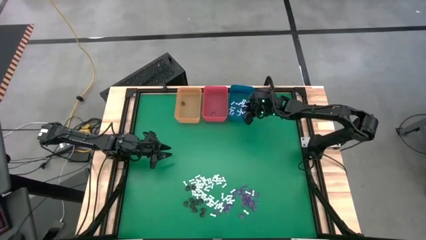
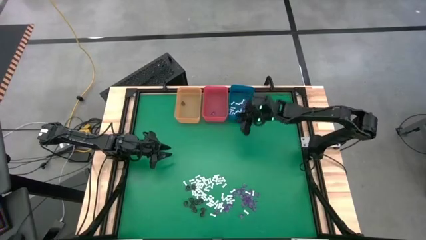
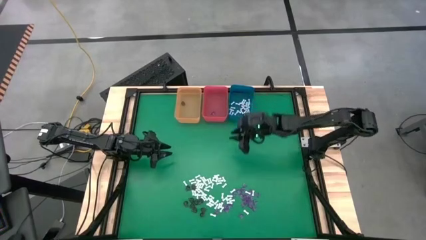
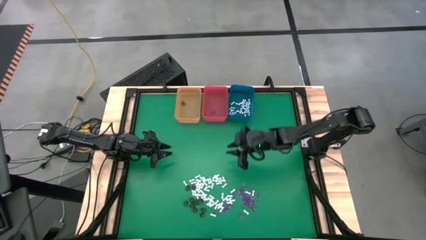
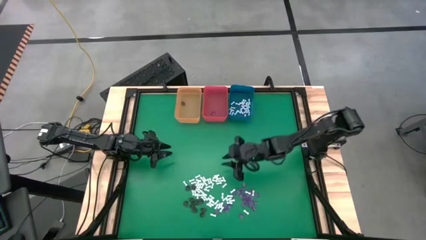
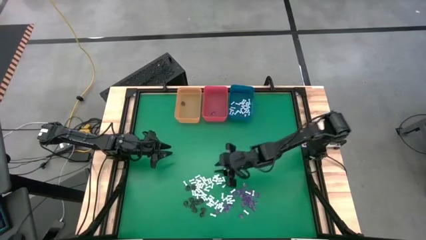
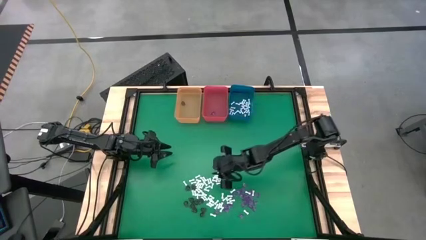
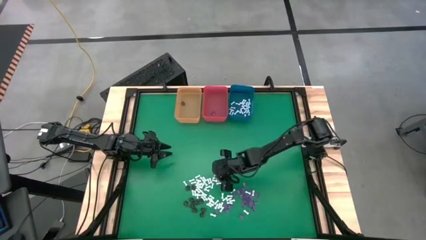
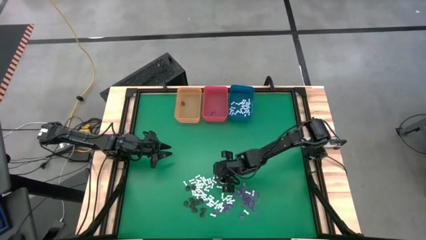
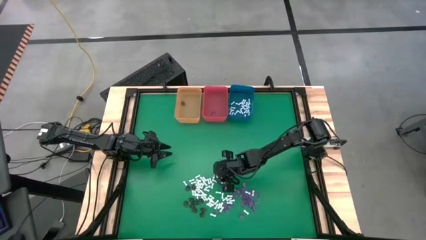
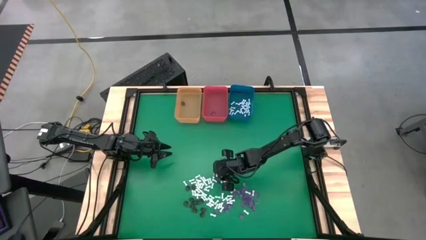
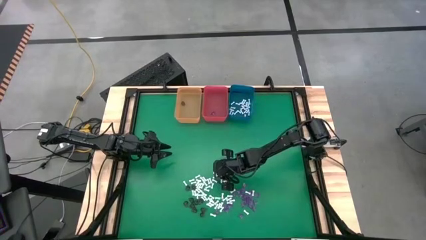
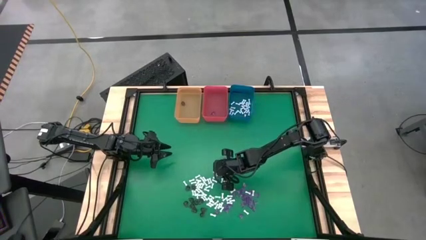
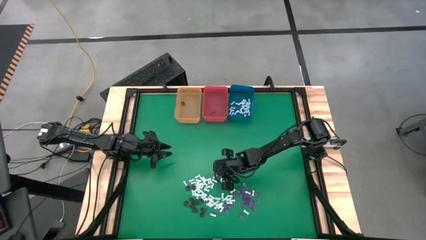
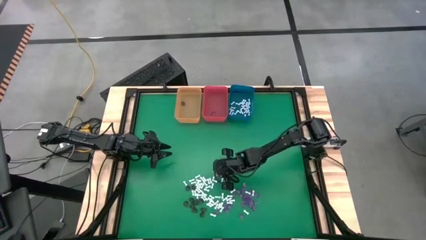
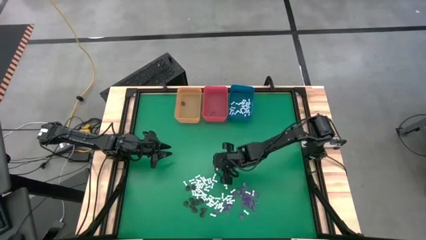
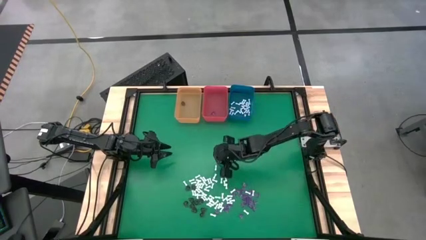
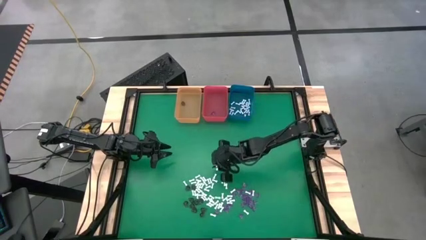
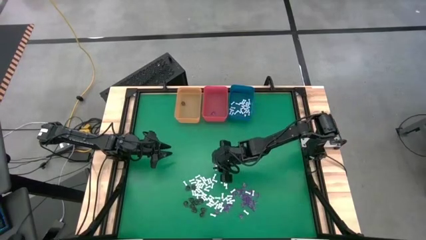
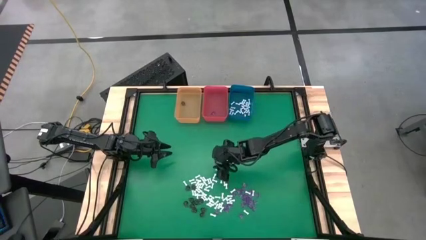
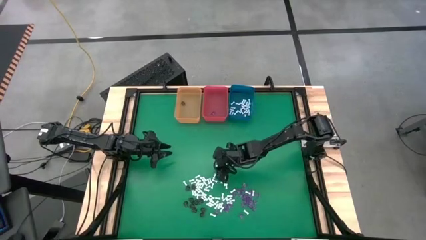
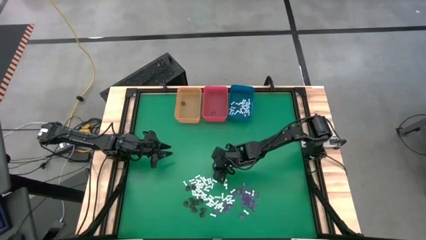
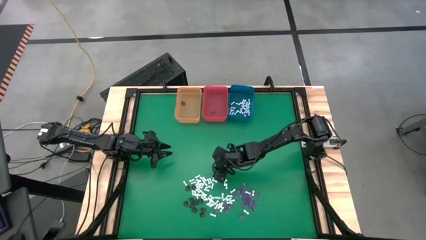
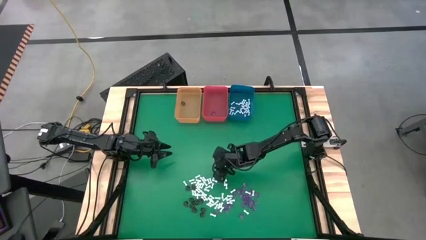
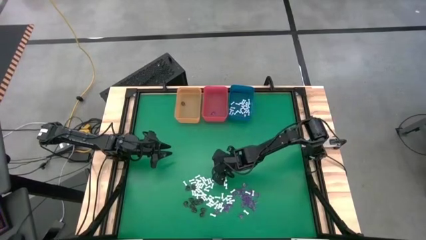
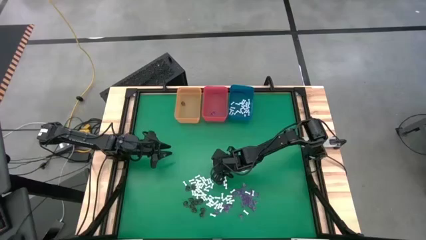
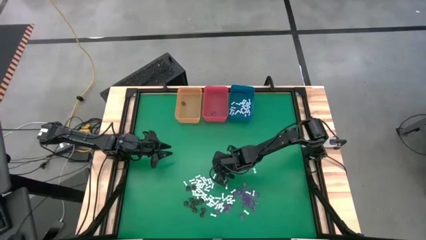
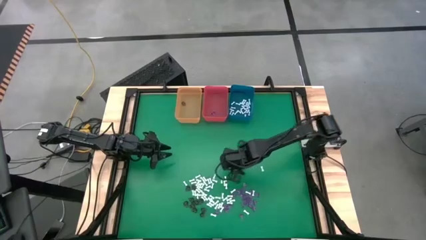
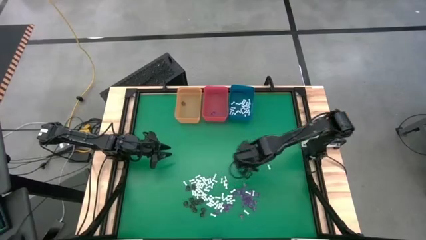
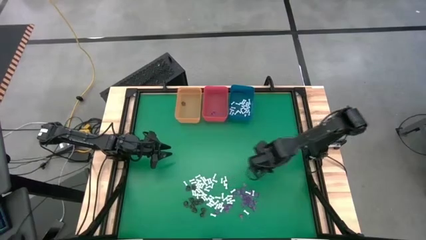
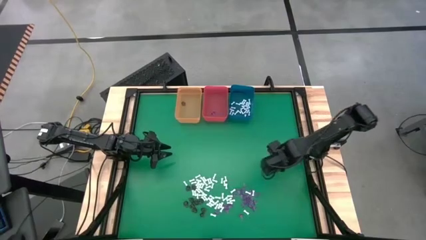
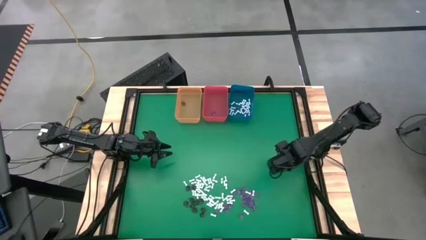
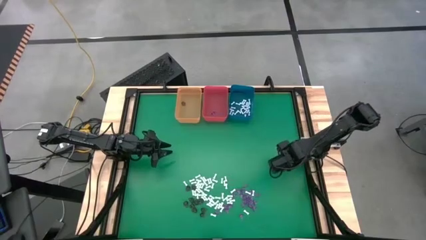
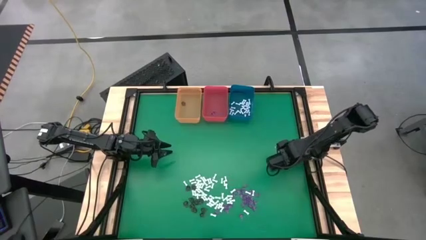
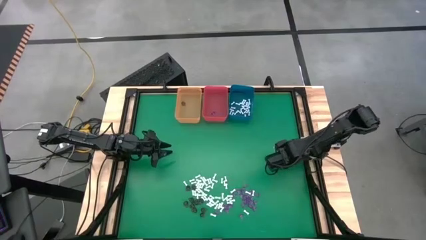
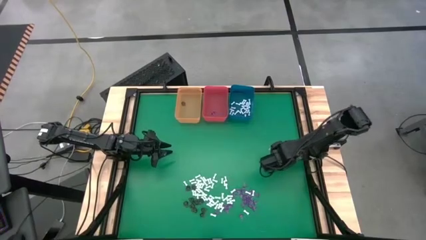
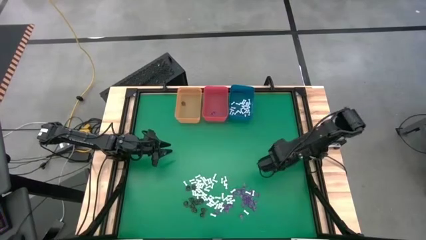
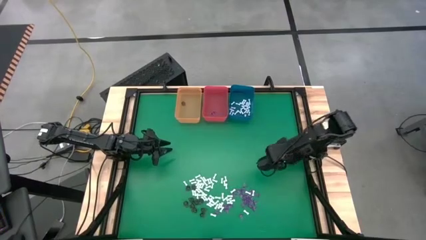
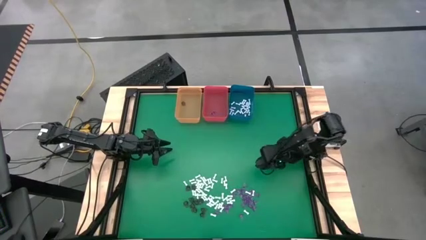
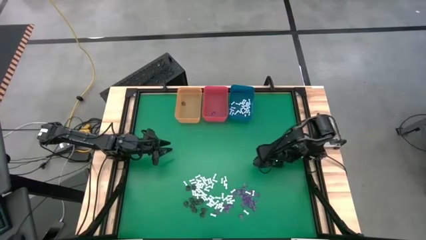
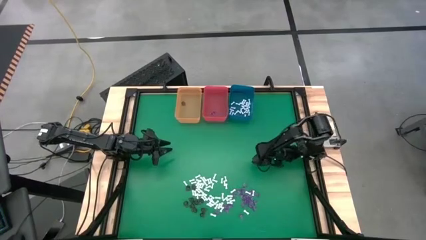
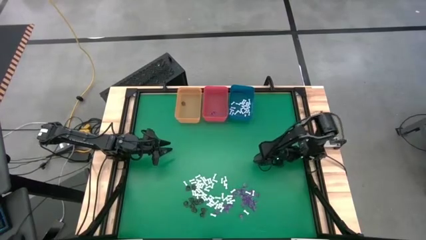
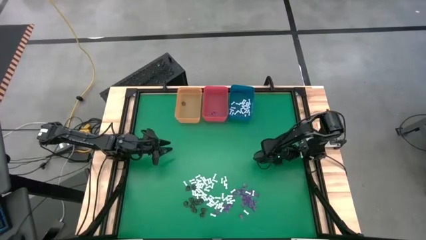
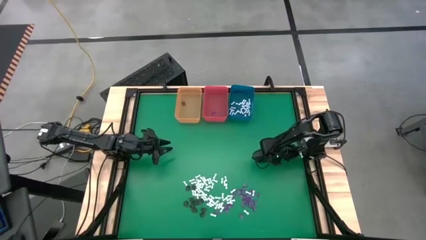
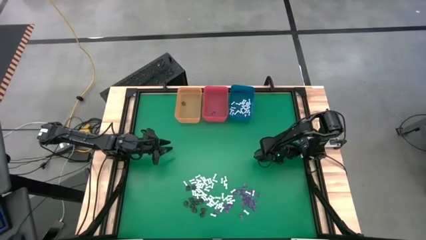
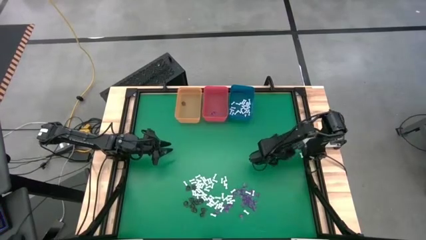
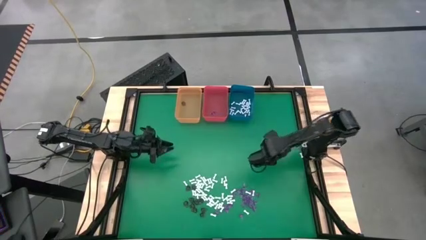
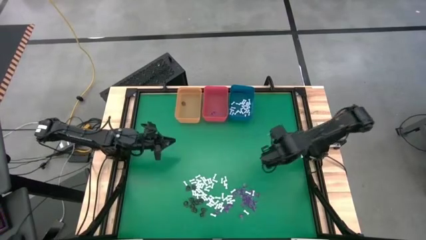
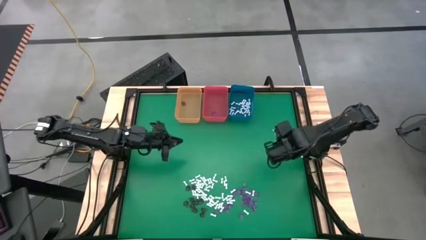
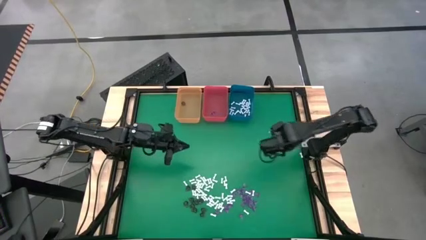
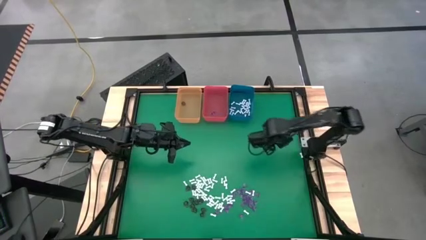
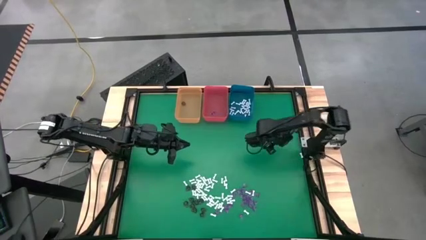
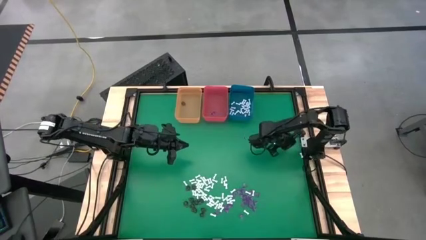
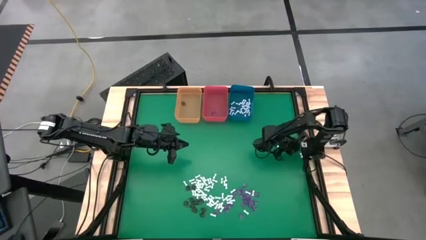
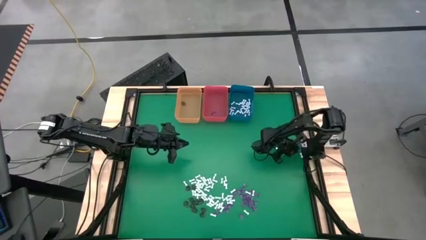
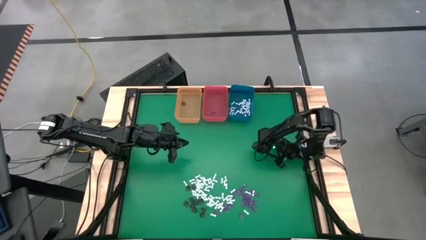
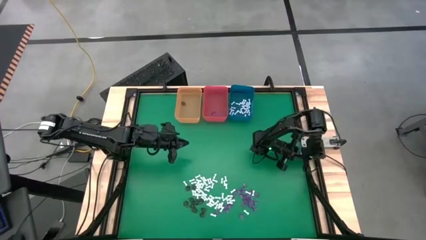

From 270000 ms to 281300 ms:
Task: Sort Halloween decoration
Put the white bone toy into the blue bin

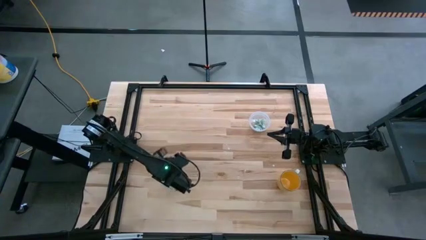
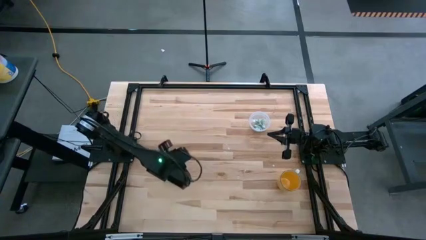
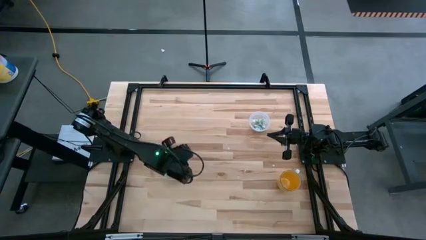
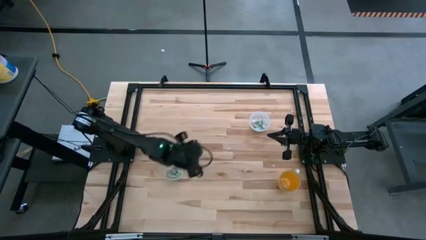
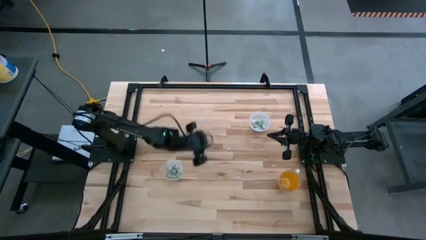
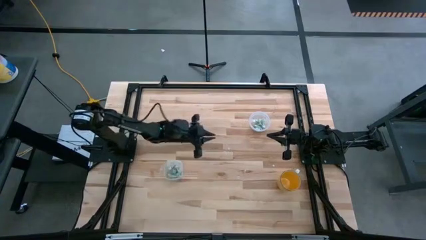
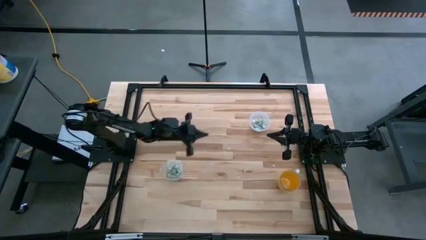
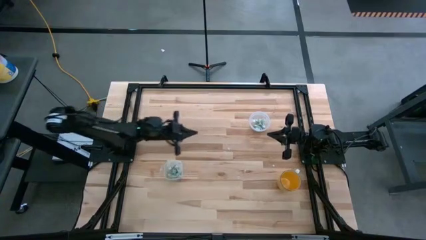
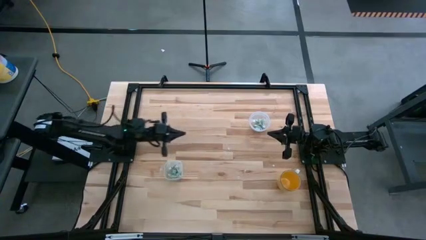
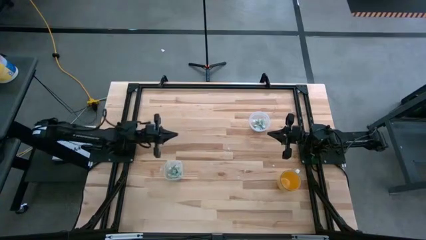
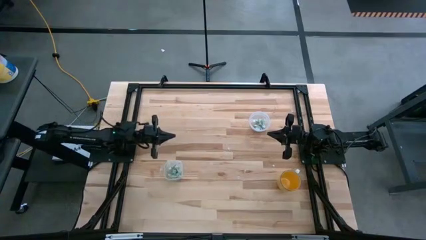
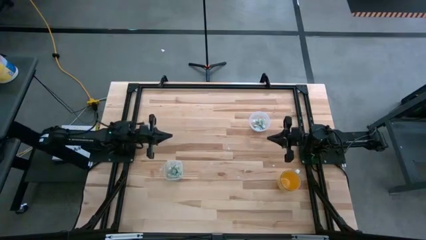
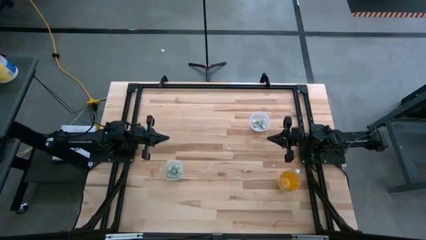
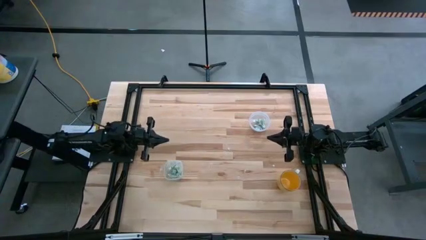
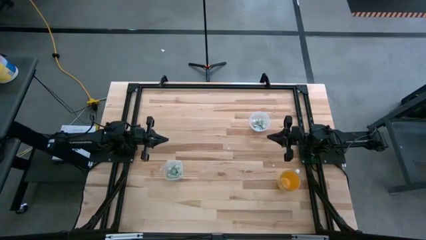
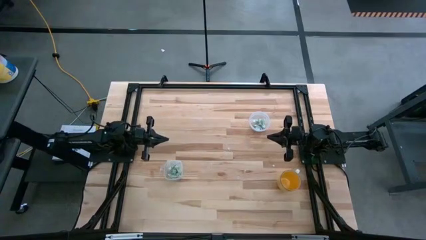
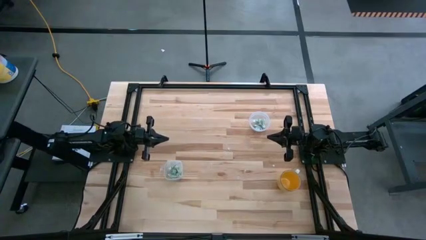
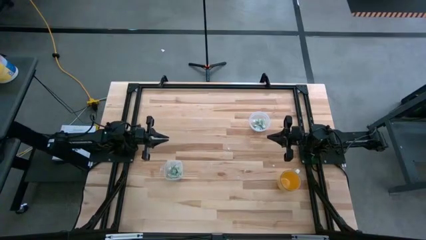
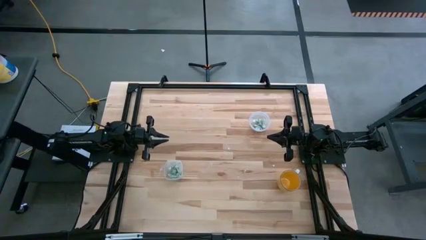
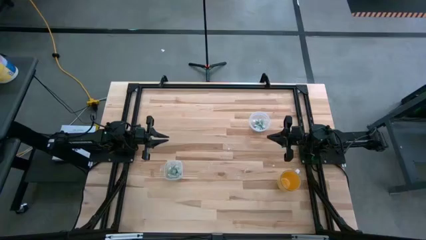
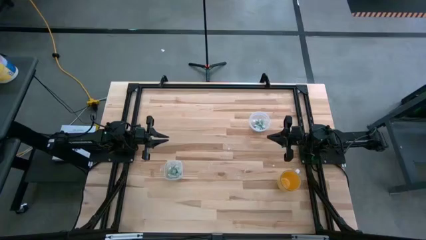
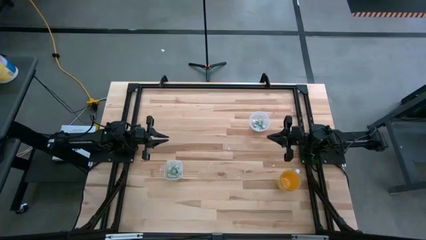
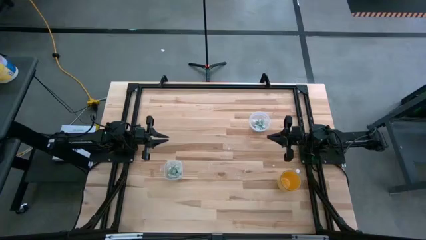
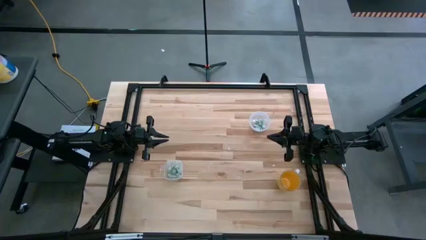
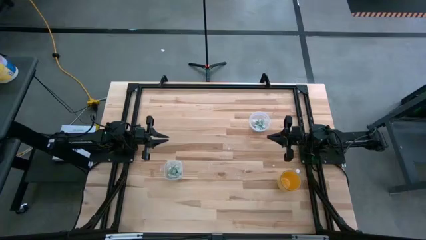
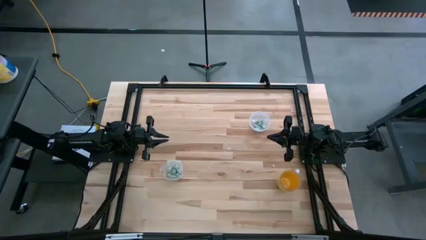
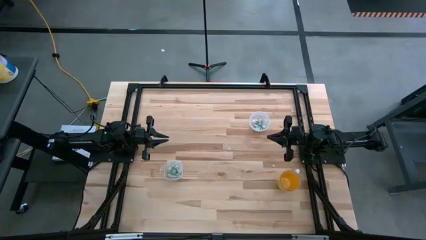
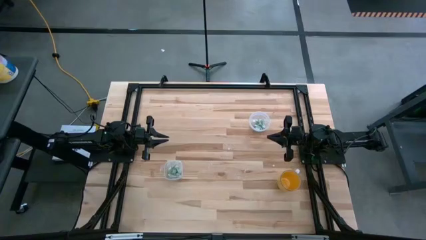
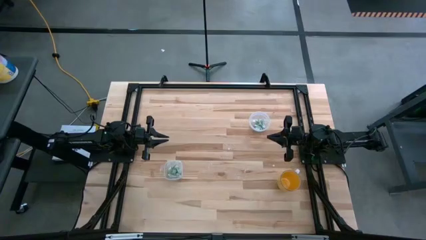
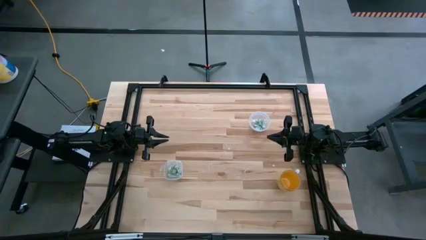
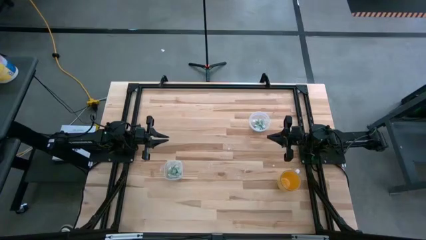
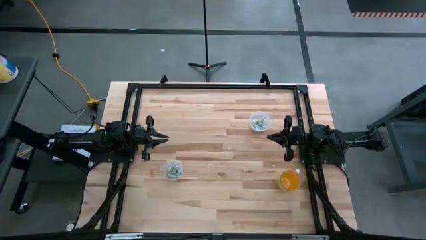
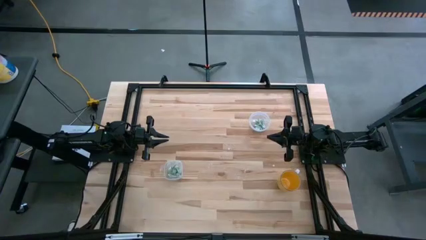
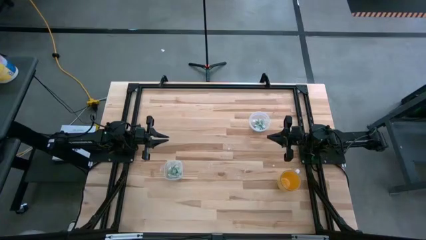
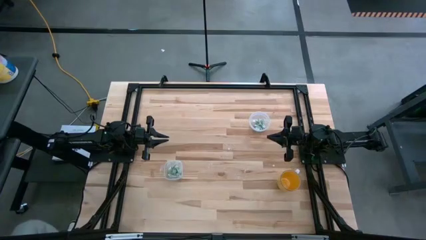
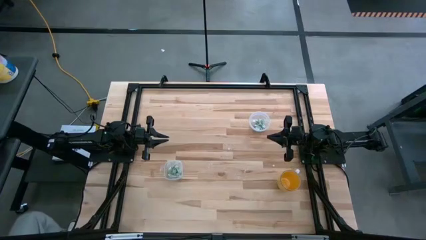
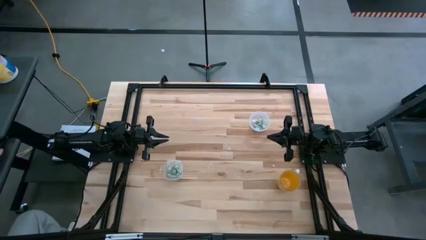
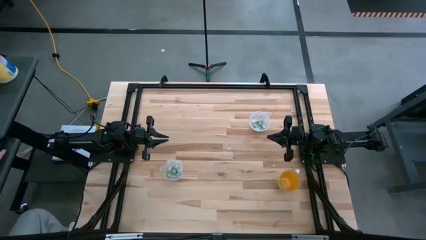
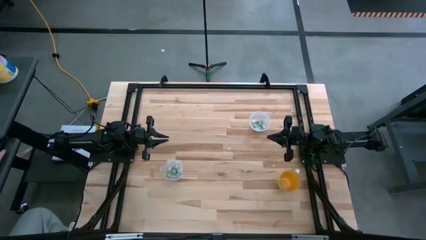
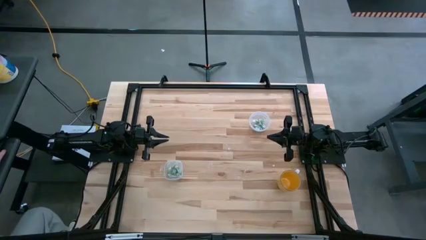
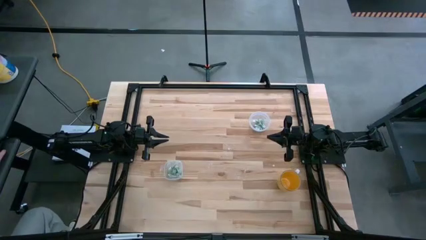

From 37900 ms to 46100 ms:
Task: Pick and place Stevia / Truvia into bins
Return to Home Position
